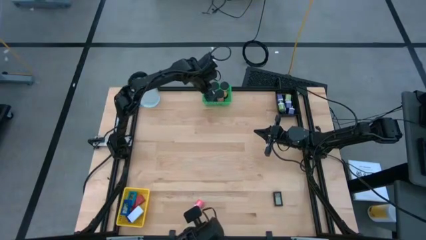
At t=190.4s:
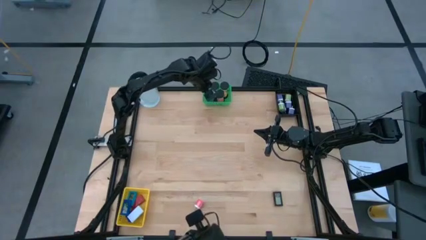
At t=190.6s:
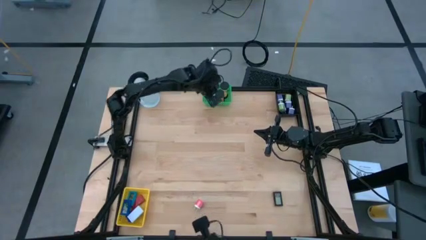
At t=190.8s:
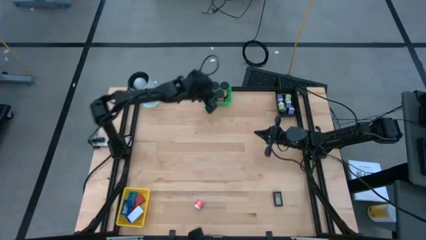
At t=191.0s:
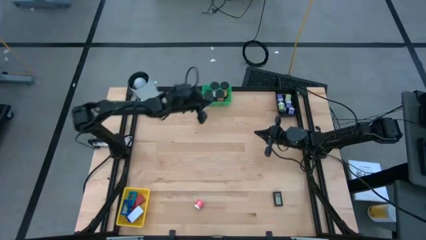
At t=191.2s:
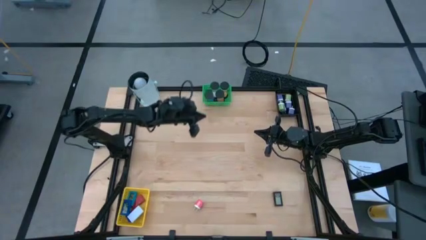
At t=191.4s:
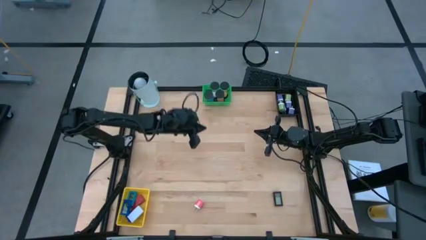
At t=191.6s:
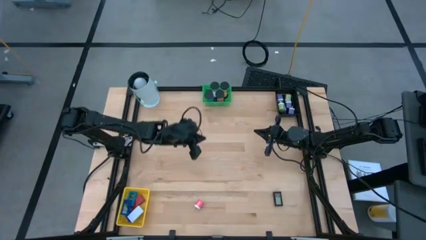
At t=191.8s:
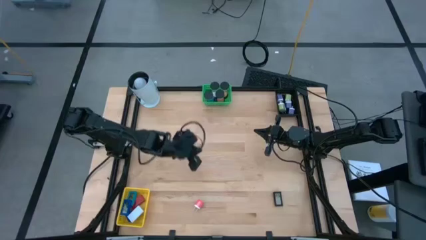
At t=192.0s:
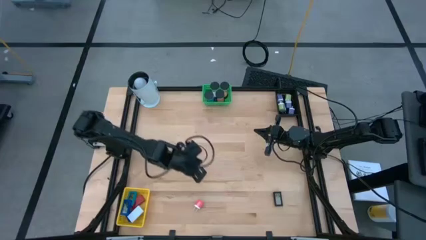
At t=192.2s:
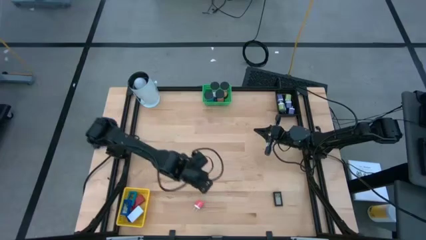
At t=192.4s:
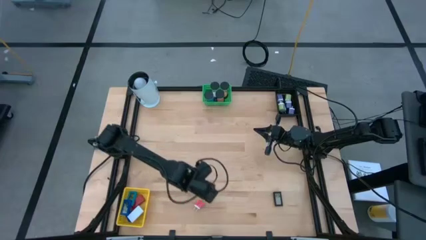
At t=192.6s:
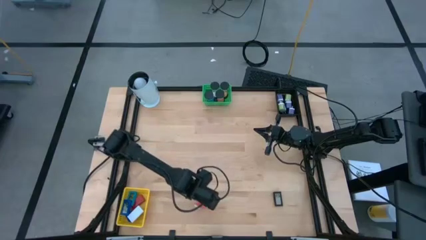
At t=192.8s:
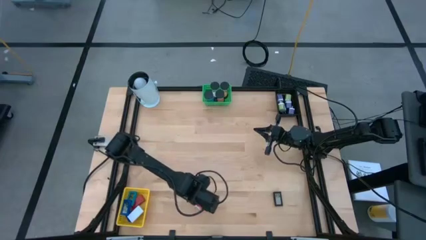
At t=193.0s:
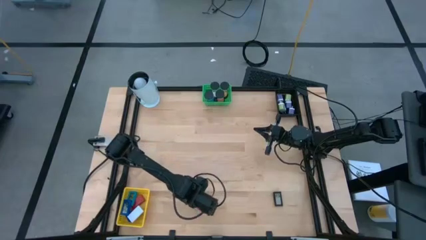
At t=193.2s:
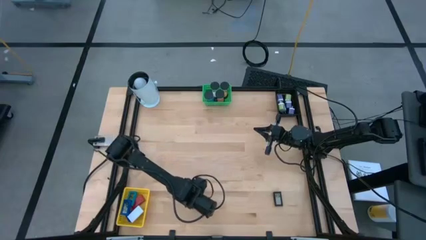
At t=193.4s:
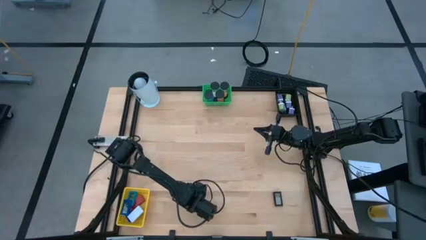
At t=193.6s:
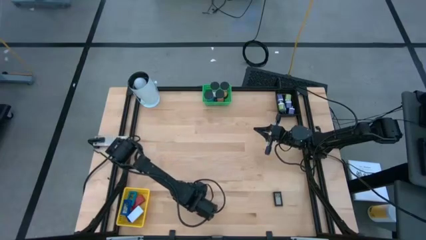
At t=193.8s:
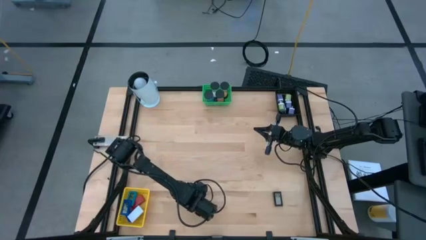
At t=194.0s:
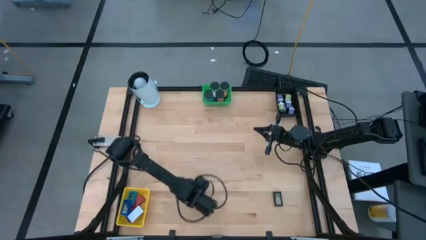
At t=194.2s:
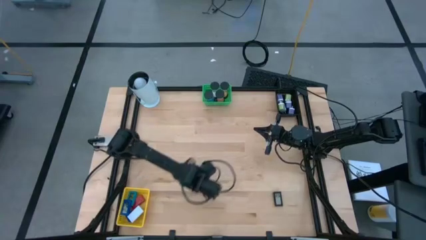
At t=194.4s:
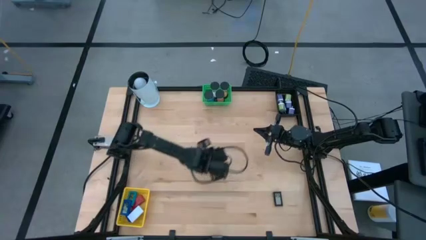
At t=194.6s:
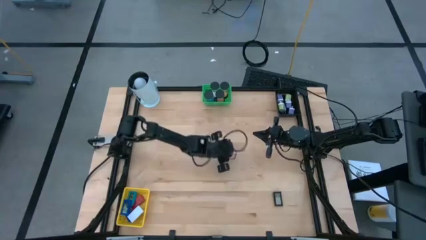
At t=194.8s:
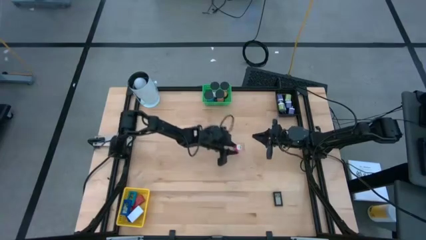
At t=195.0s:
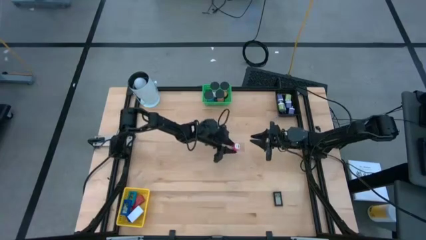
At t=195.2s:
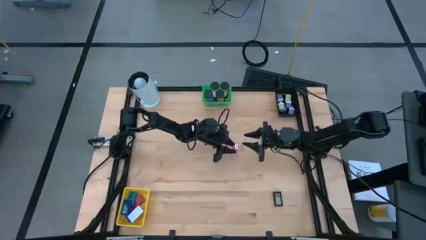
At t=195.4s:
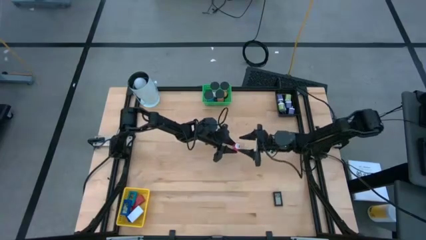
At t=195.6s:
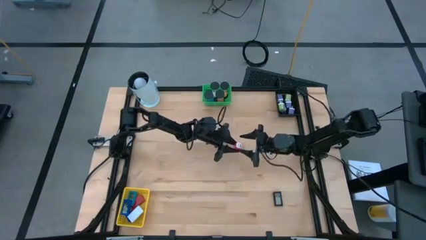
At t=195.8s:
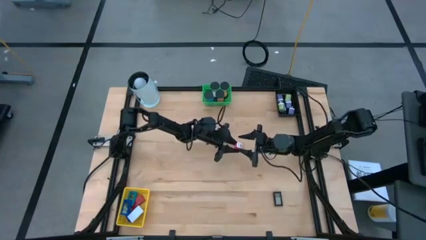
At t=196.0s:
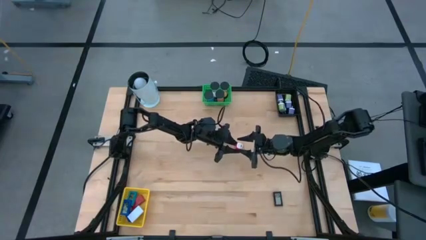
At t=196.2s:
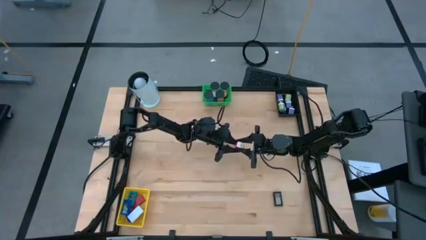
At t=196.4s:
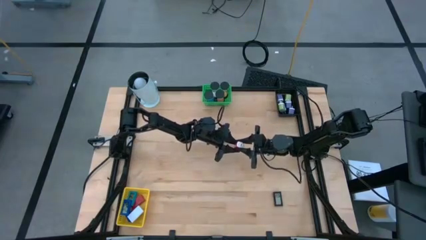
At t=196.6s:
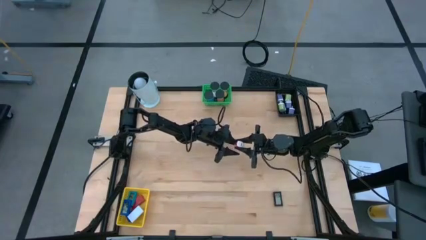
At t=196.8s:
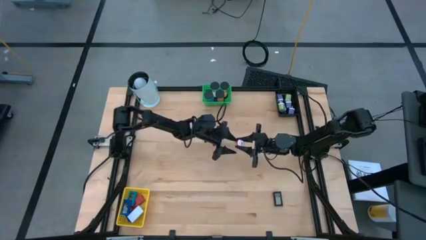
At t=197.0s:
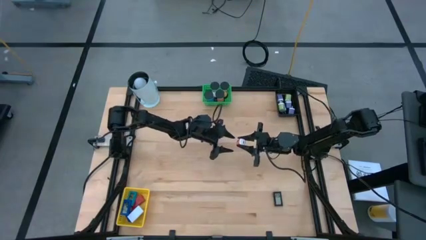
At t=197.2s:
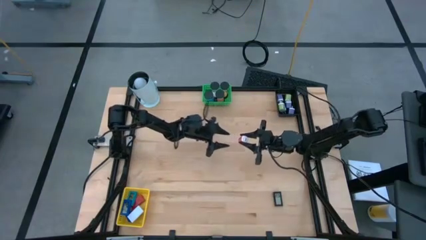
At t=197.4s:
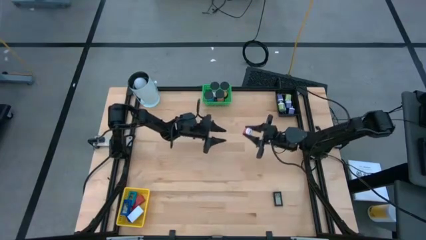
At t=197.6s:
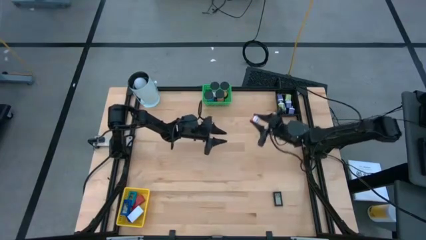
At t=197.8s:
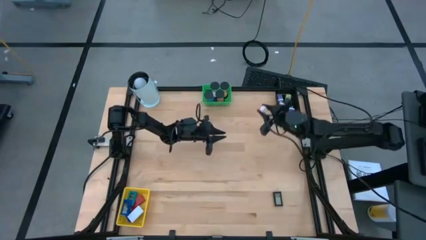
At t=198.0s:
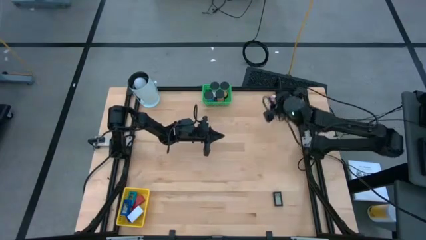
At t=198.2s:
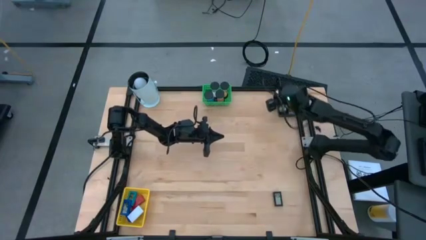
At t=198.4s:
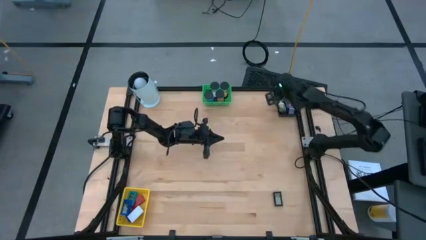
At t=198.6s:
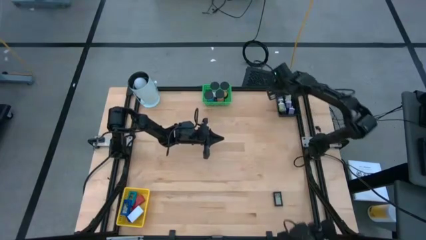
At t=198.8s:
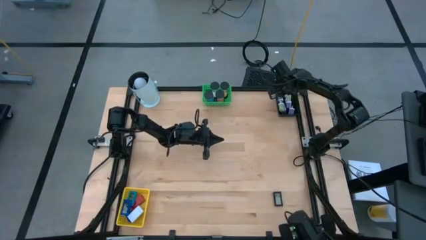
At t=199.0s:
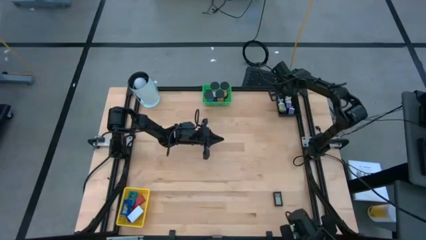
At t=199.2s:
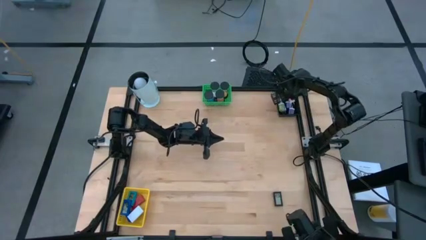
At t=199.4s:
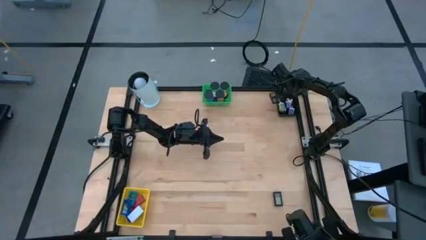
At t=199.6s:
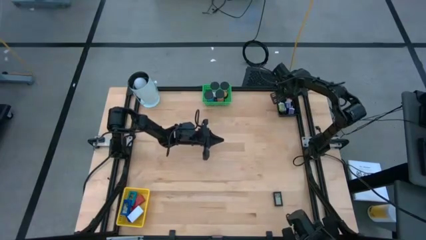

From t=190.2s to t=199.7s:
Task: Pick & Place Office items
Put the red adapter into the black bin

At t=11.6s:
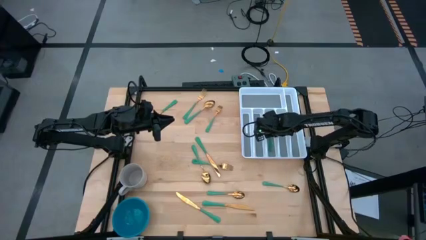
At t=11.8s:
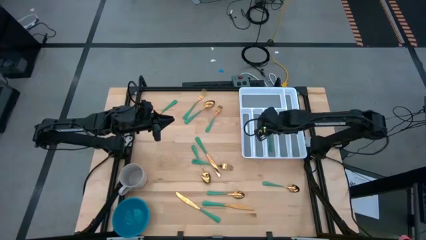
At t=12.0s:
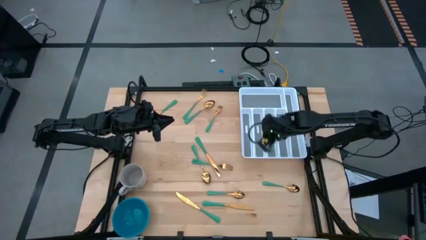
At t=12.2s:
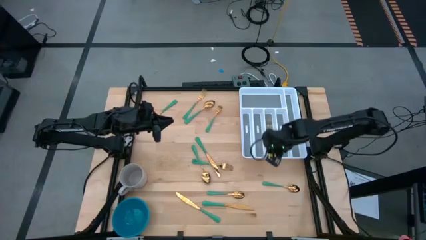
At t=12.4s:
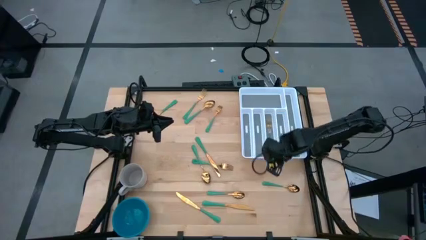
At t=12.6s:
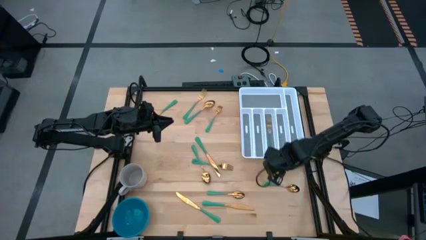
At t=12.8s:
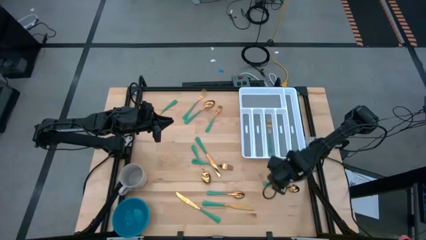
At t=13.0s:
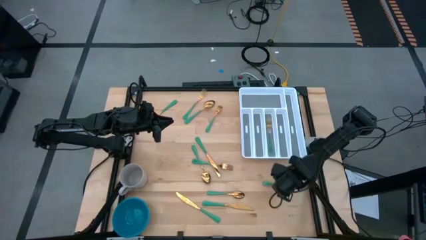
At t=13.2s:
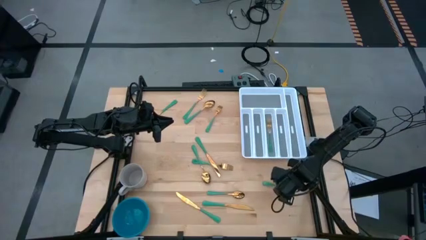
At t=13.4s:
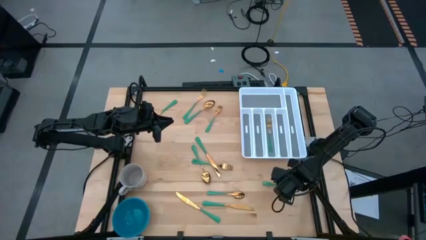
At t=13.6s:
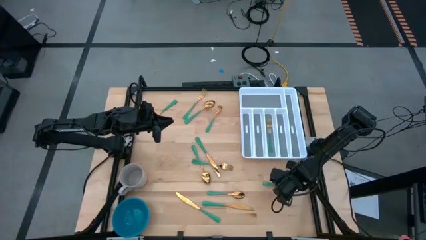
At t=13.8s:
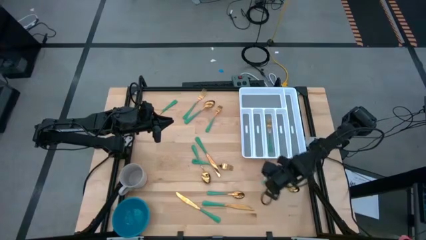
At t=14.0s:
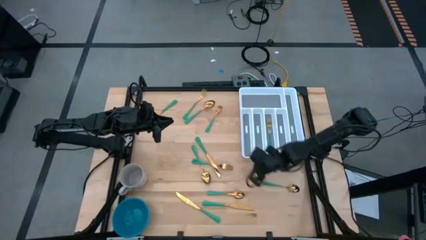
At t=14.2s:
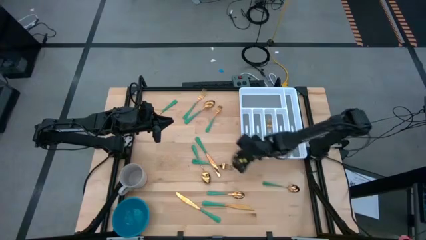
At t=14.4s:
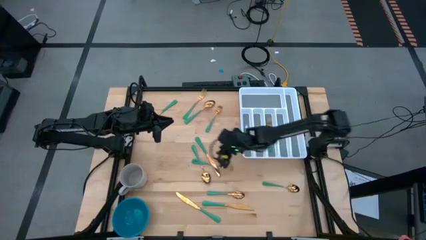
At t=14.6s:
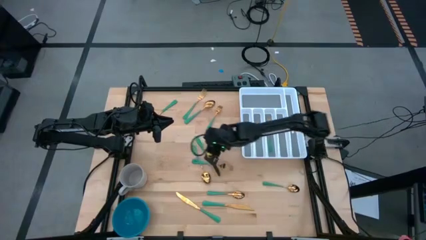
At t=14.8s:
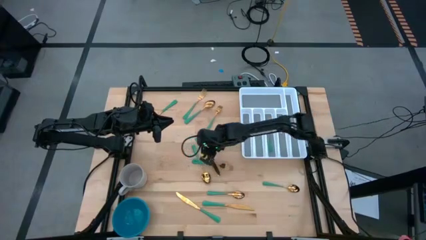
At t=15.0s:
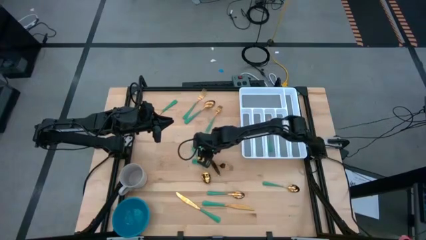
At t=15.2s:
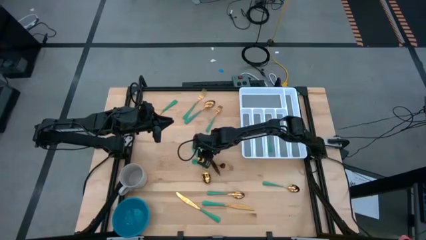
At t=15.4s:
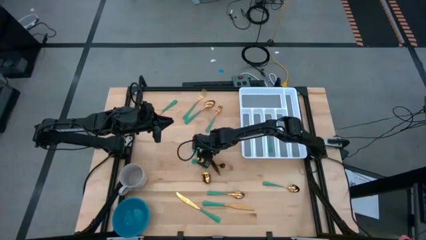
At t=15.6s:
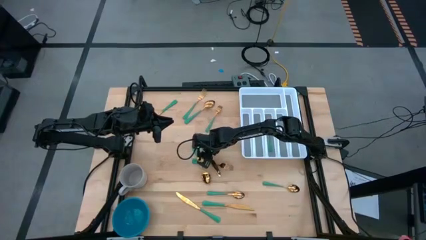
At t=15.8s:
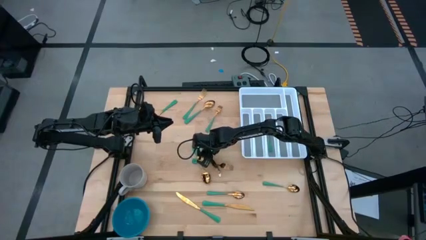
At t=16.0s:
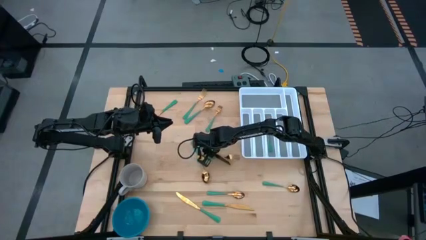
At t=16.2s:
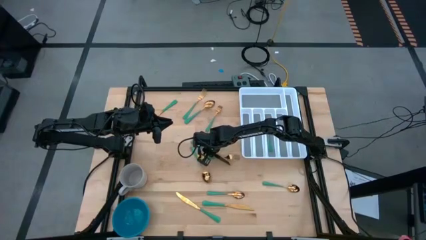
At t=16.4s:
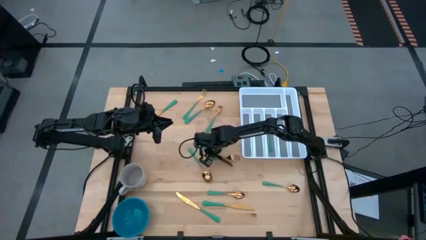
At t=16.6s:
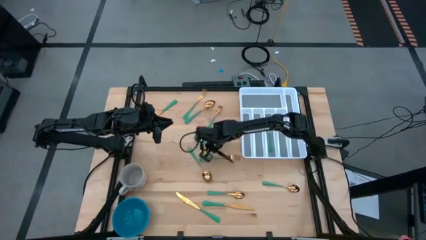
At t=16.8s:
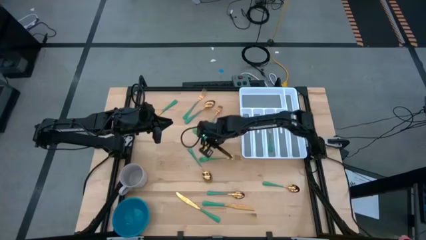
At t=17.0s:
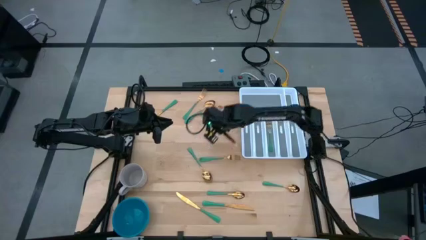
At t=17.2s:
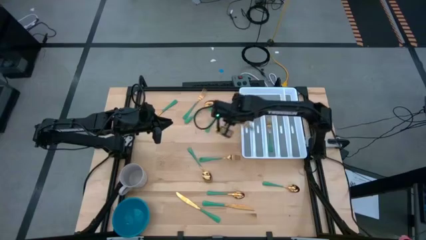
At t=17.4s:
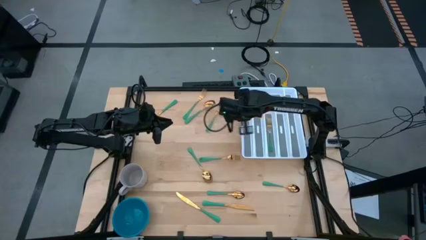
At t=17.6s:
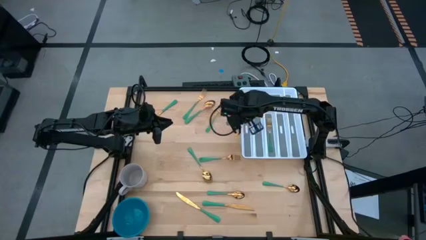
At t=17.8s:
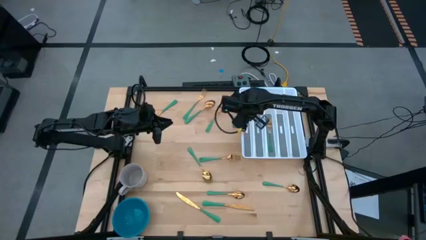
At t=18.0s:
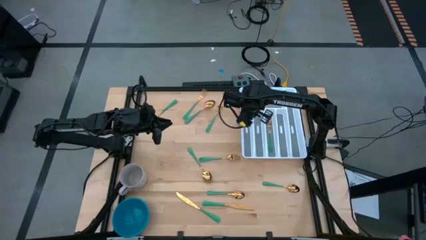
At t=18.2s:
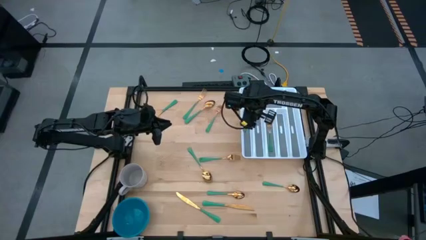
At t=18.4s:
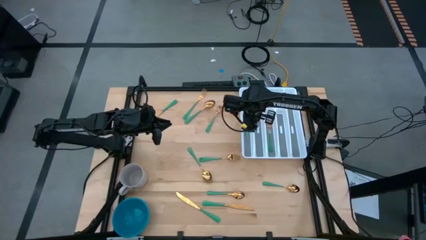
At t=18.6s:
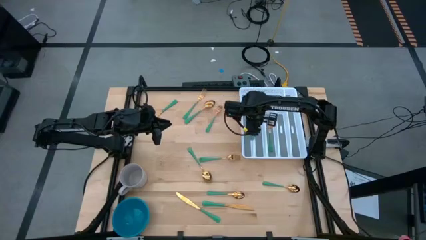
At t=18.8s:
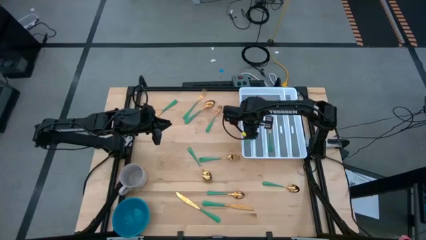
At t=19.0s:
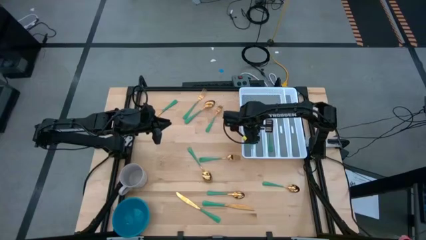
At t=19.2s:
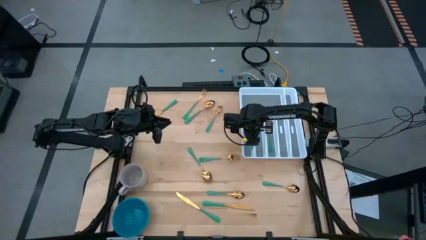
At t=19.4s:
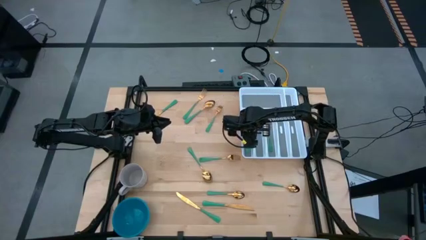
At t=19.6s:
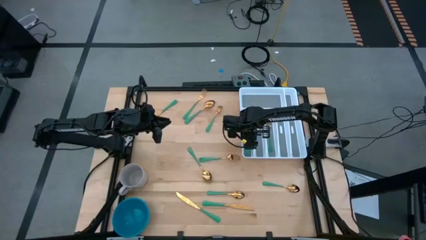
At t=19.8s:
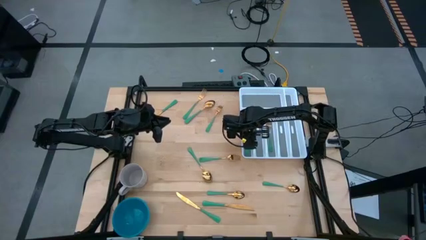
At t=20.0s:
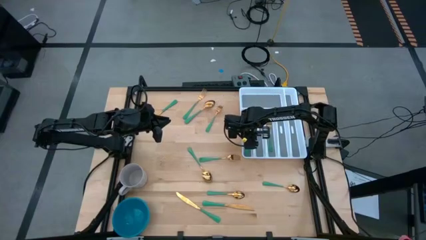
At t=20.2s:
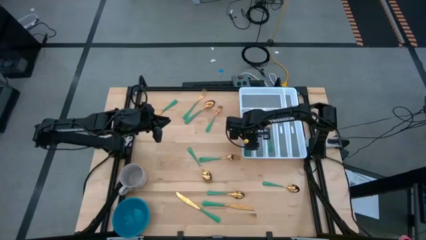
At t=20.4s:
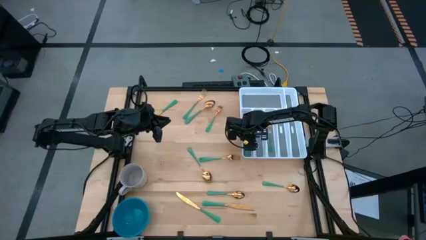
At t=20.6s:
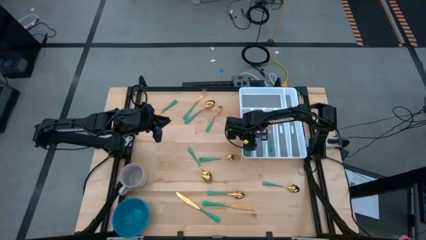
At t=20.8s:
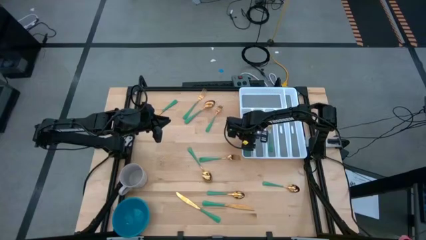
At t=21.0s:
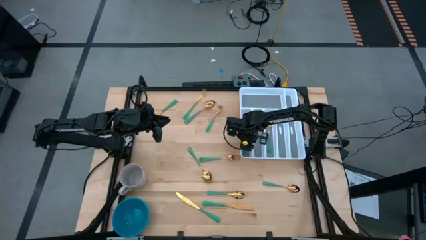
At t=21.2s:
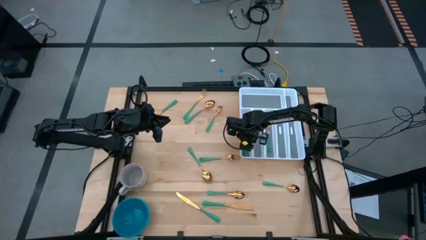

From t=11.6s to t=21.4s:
Task: Sort silverware
Put the middle green table knife into the white cutlery tray
